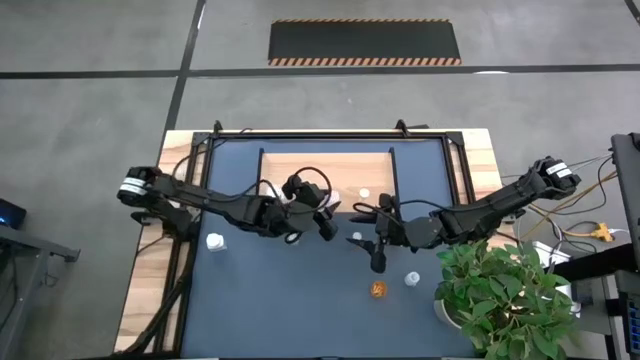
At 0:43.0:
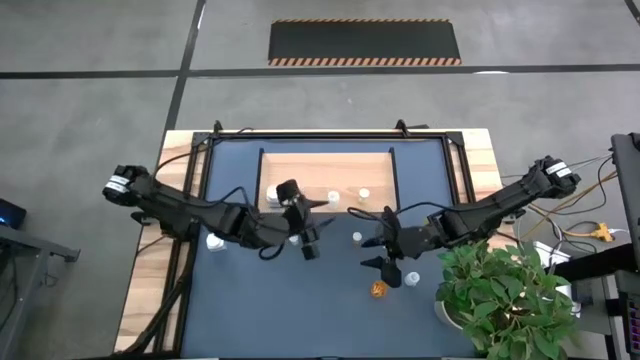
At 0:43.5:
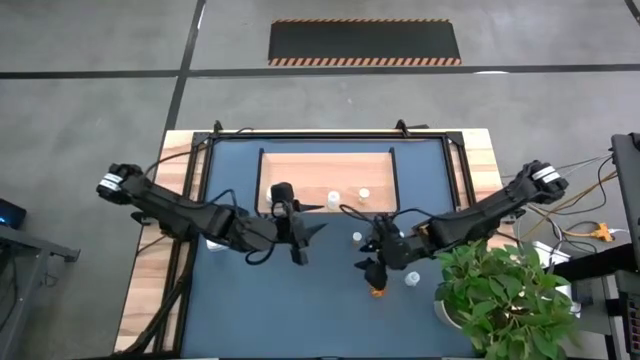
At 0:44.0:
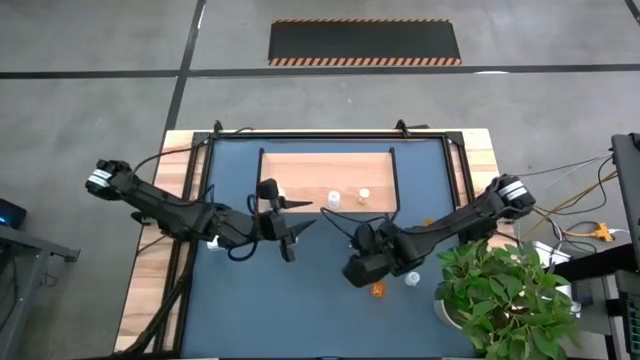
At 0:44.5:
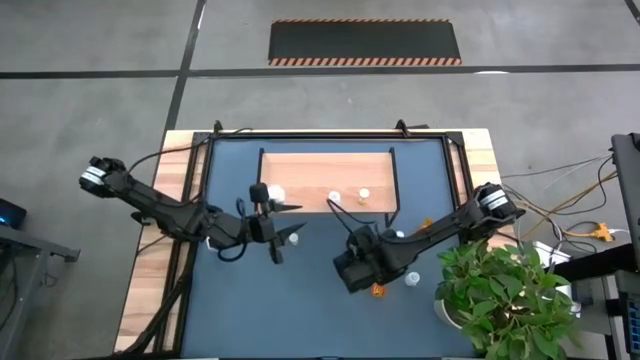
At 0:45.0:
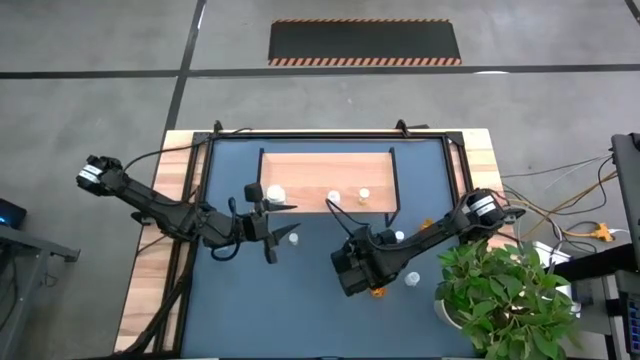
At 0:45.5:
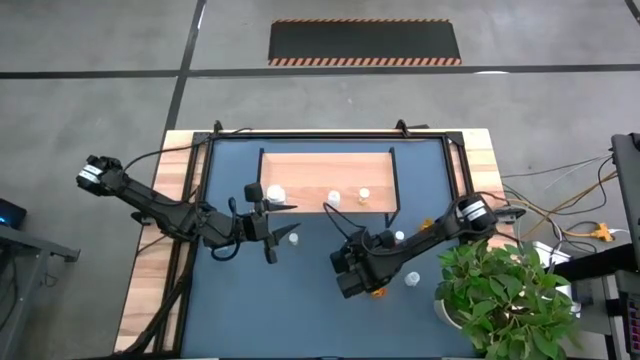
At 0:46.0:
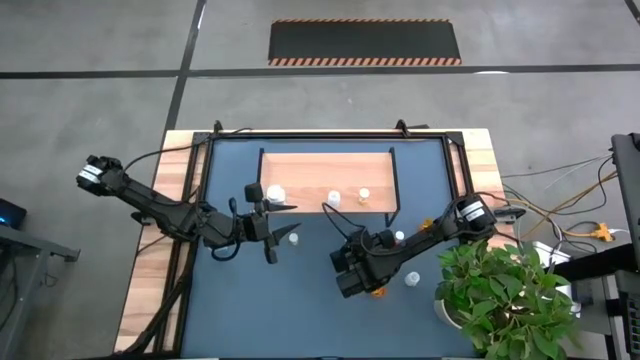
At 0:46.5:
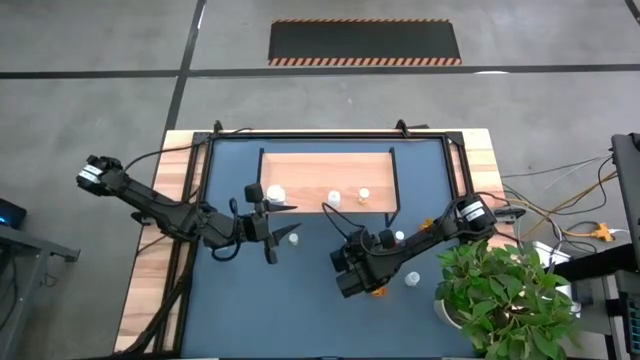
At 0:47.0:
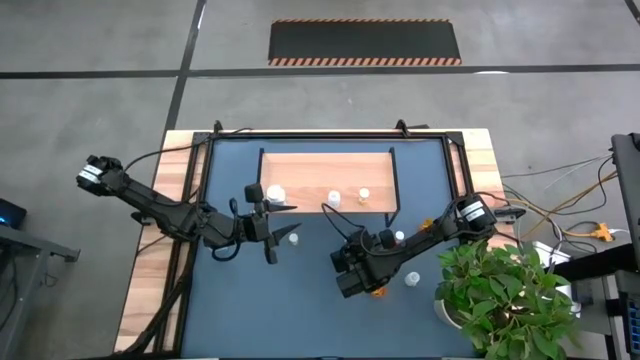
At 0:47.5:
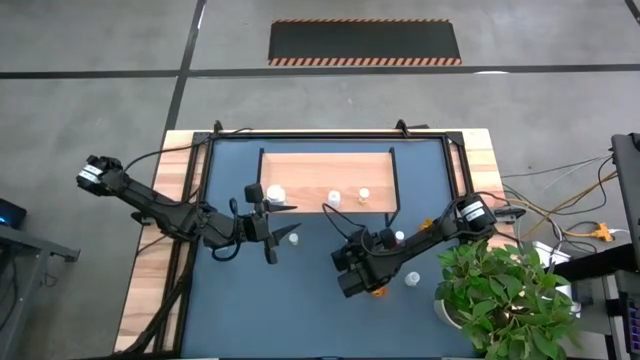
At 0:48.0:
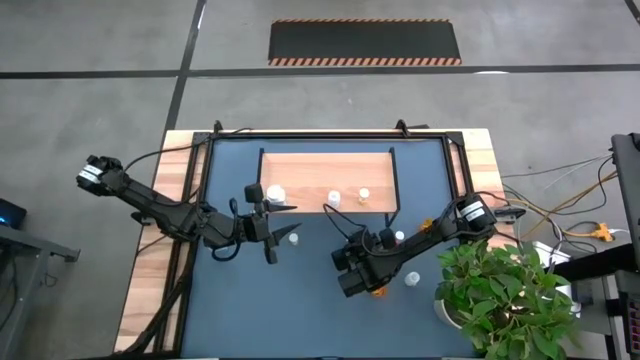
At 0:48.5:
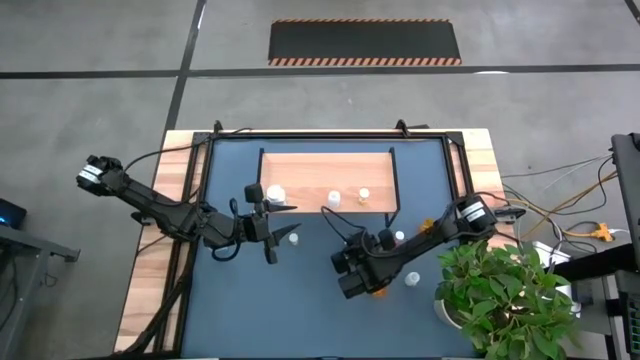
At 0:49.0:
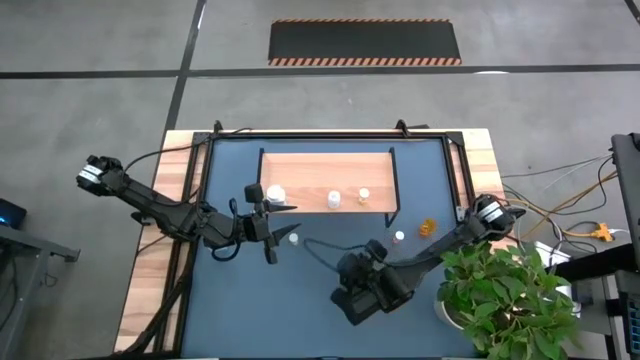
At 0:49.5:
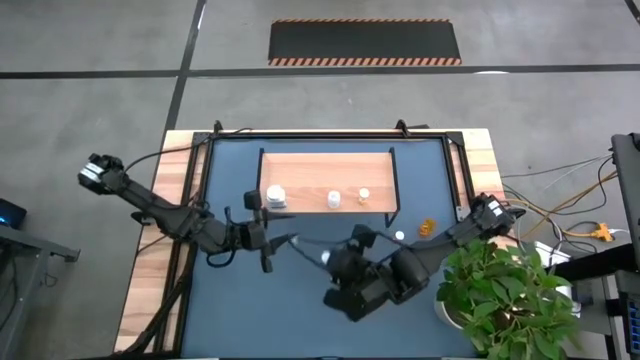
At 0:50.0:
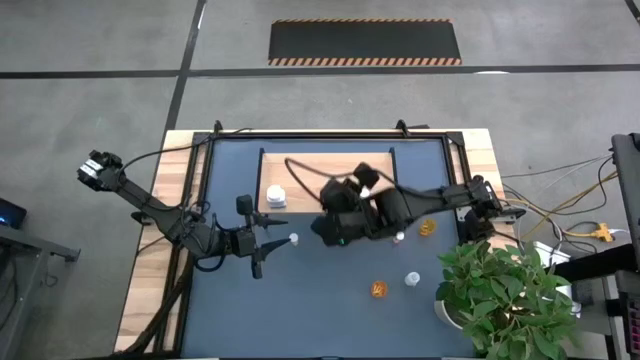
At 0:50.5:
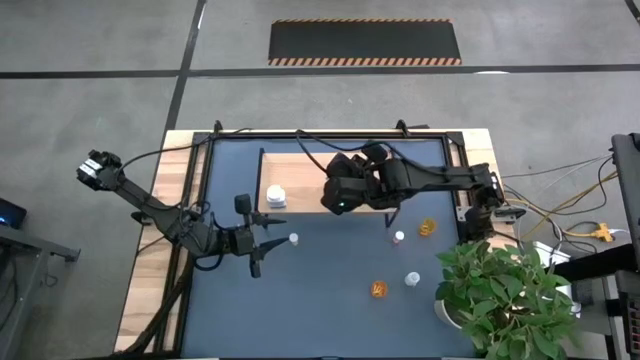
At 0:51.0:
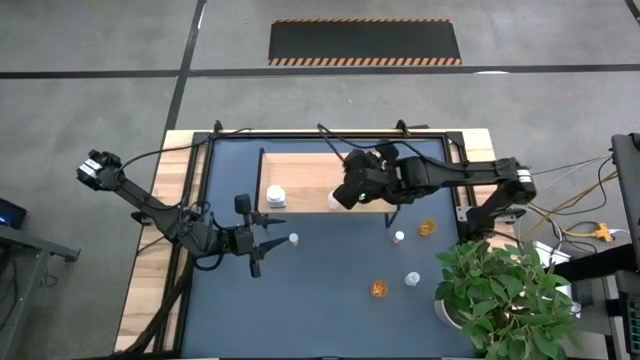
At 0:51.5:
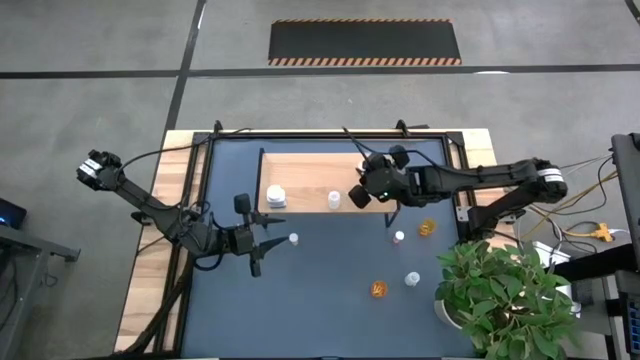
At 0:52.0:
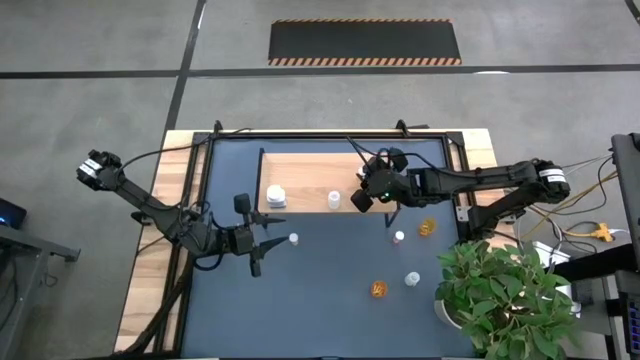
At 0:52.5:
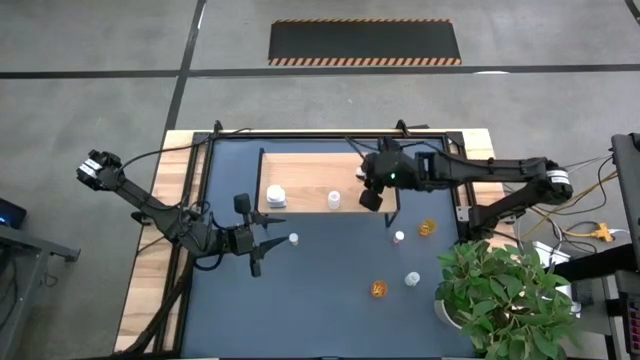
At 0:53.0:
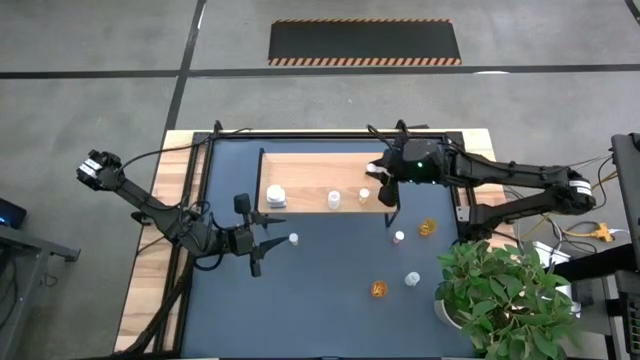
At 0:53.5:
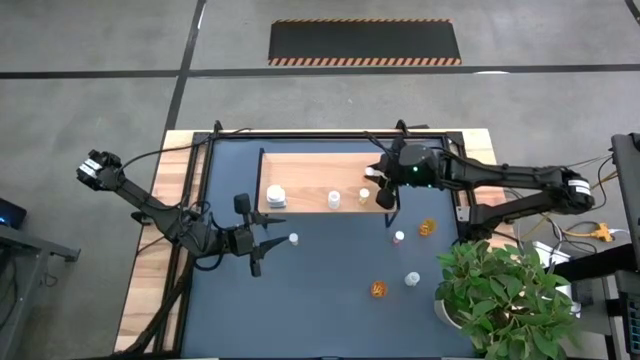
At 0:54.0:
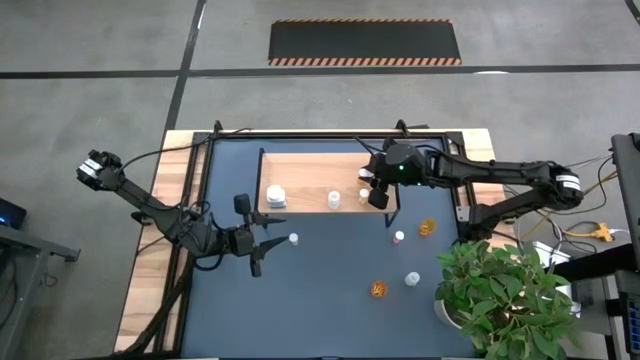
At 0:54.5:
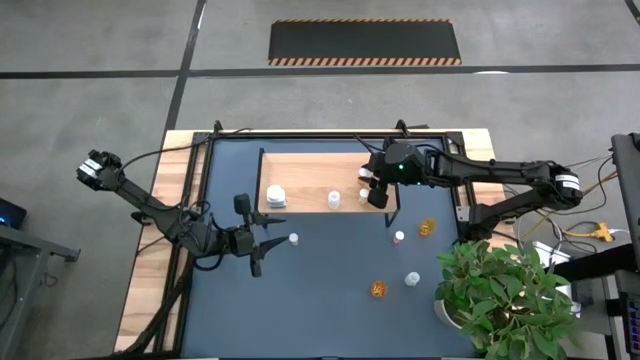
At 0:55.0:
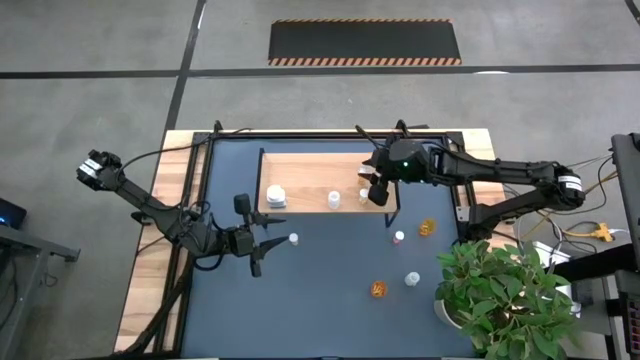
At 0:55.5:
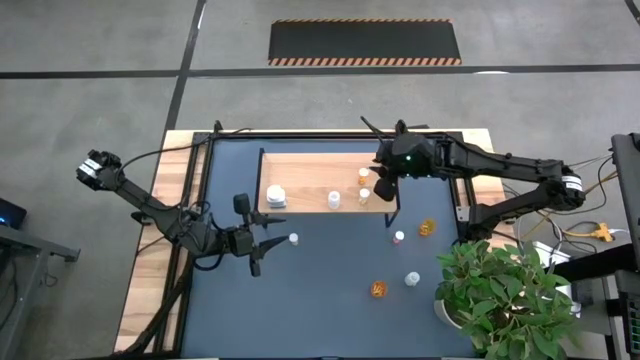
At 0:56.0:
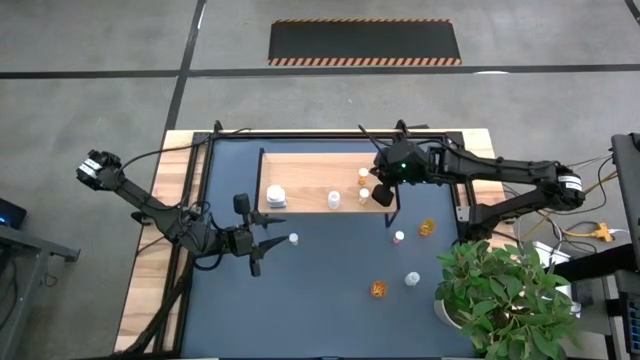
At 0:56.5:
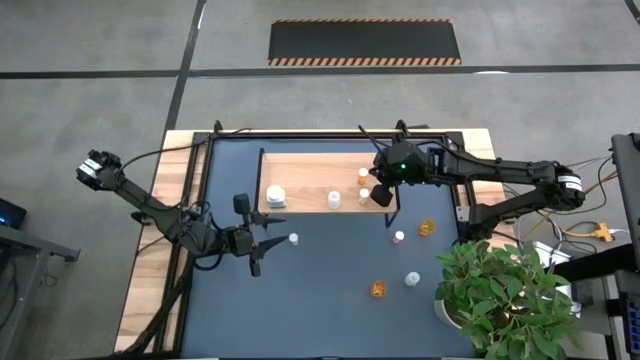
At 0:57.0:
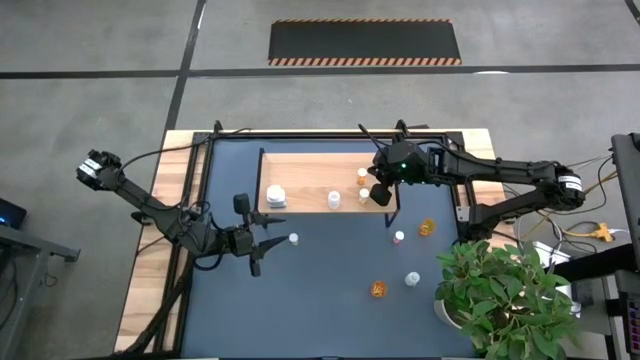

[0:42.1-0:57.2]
Task: Pick and place medicine bottles onto shelf by color
Put the small orange bottle on the shelf

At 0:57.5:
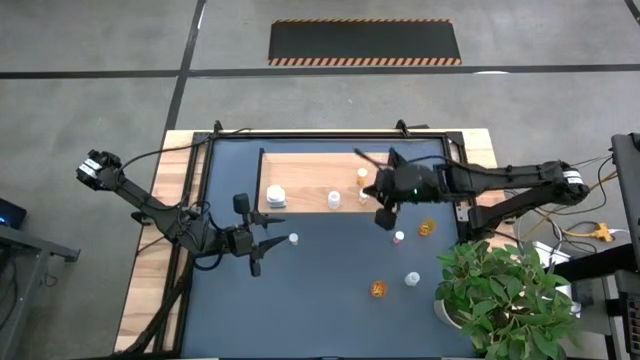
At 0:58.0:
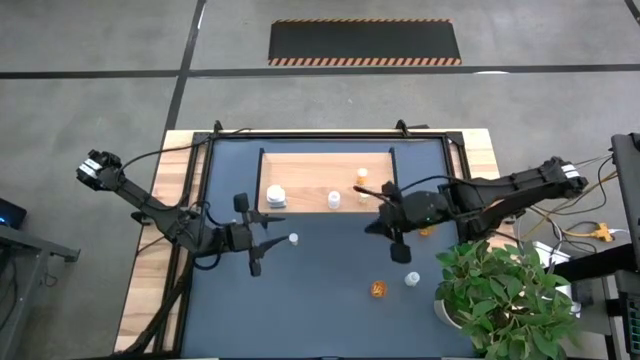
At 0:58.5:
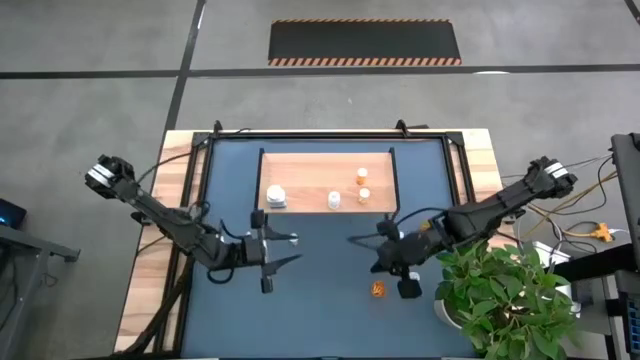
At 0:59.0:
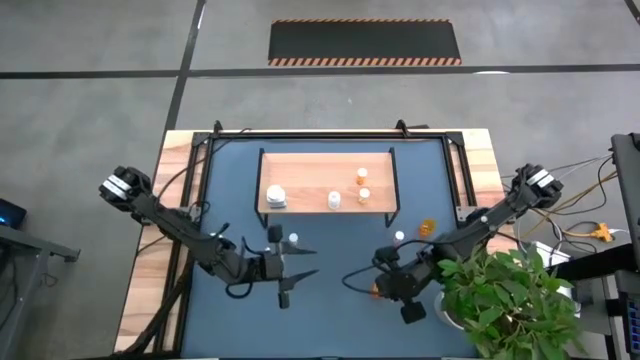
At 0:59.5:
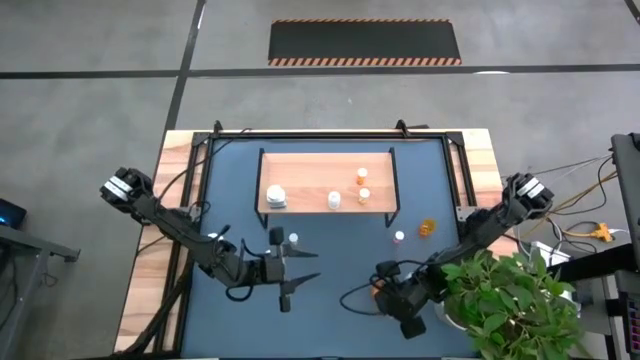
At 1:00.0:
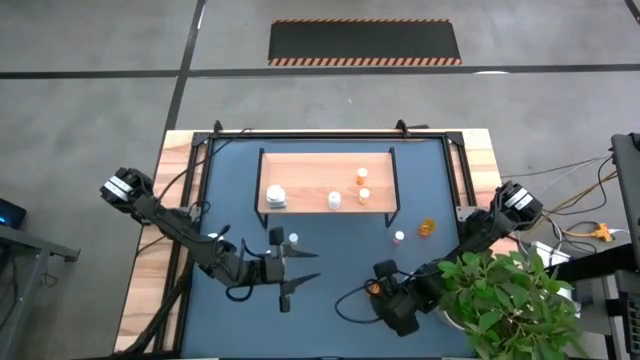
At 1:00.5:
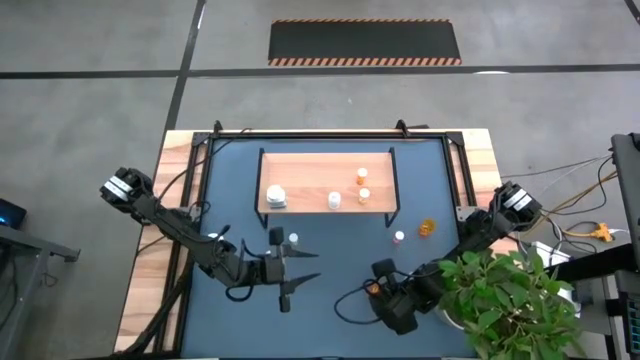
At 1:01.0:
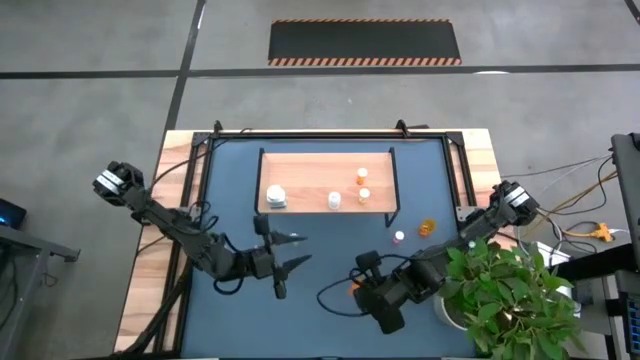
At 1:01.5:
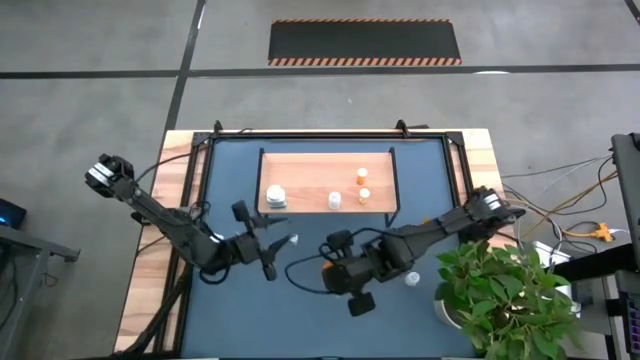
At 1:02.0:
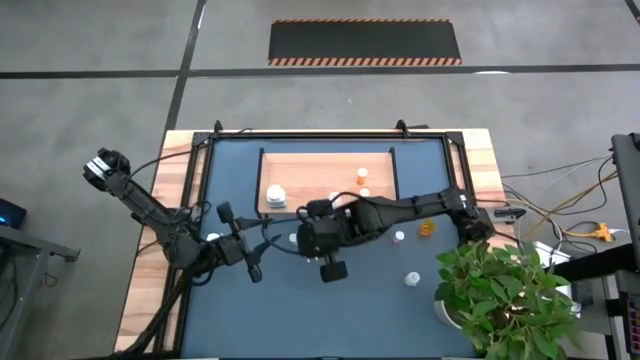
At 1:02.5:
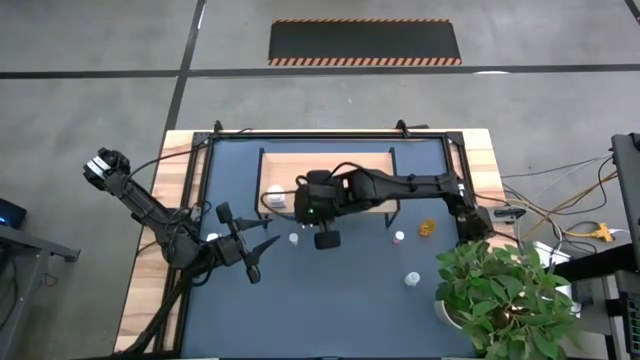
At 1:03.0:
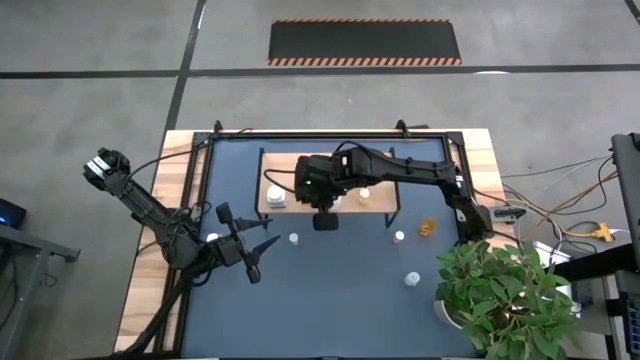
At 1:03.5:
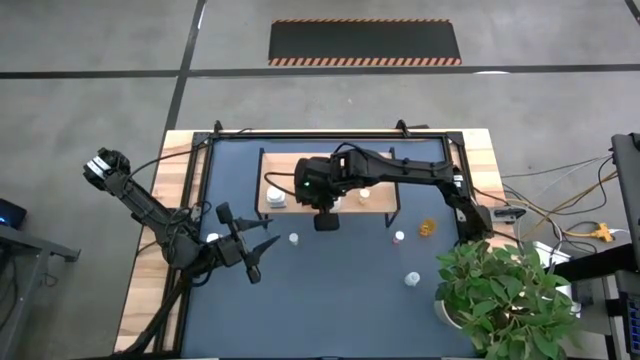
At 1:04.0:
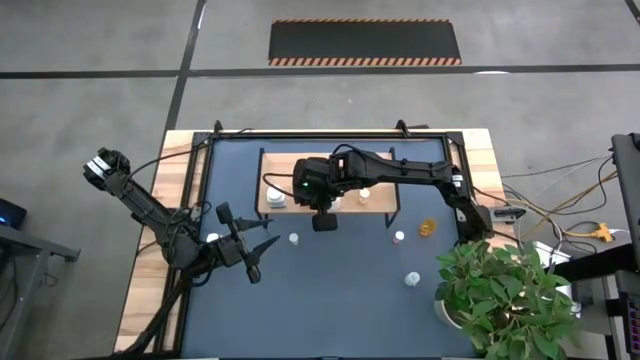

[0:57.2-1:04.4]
Put the bottom large orange bottle on the shelf
